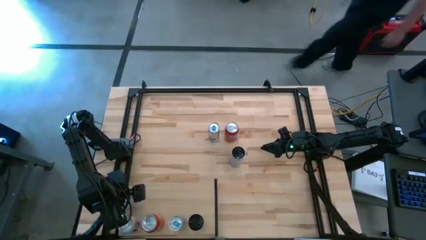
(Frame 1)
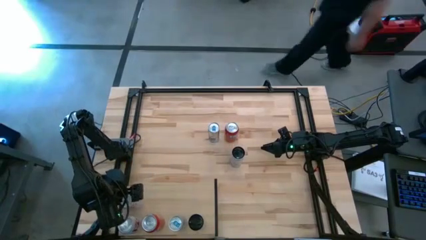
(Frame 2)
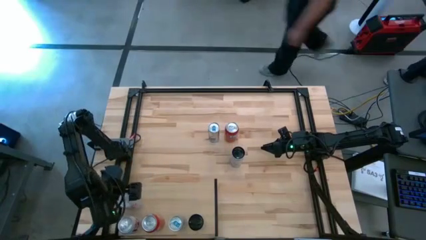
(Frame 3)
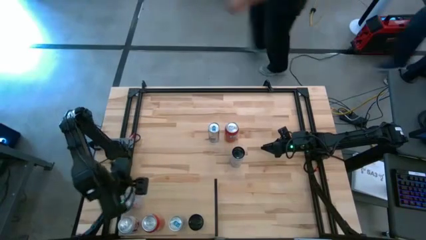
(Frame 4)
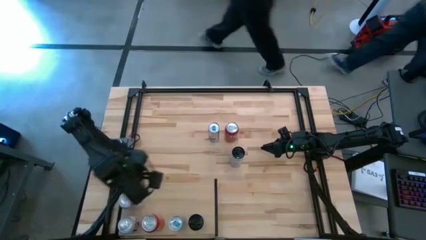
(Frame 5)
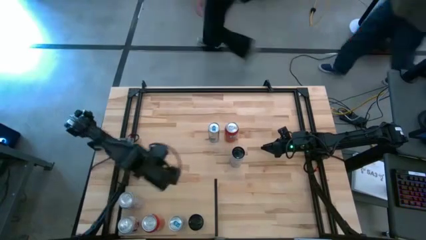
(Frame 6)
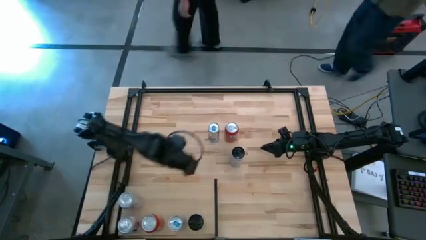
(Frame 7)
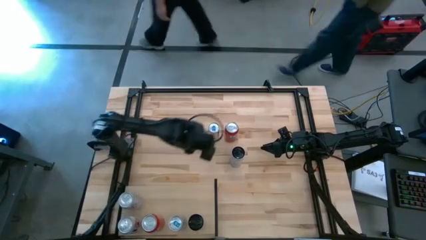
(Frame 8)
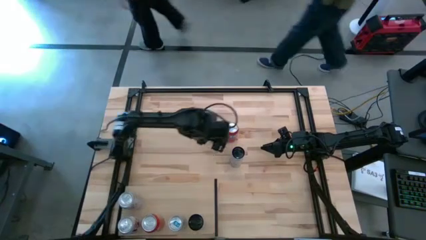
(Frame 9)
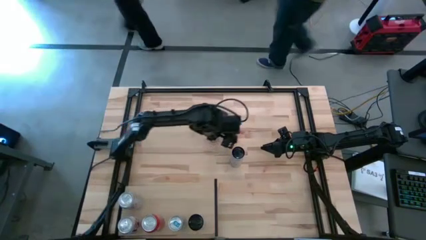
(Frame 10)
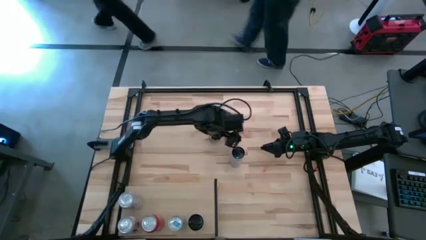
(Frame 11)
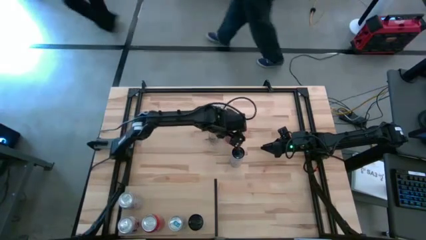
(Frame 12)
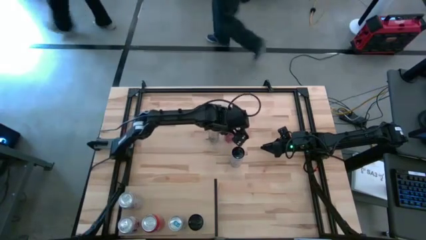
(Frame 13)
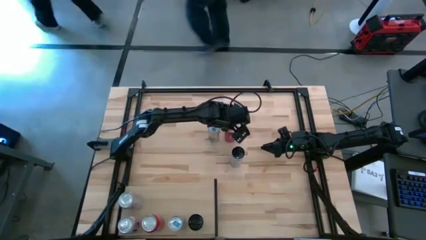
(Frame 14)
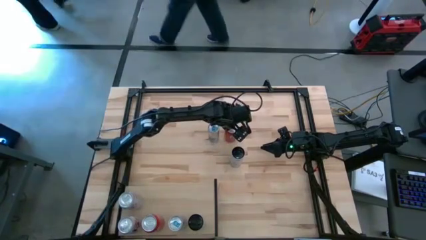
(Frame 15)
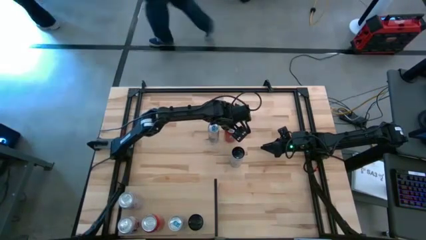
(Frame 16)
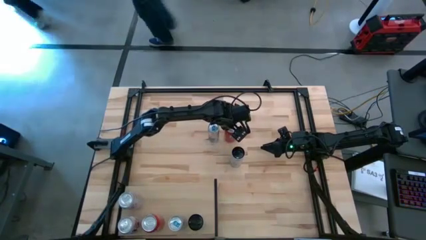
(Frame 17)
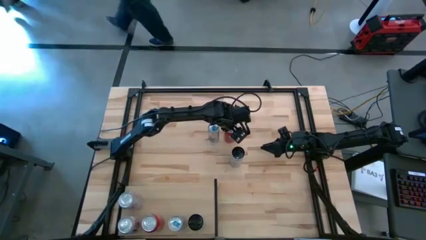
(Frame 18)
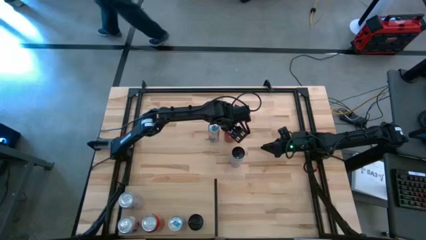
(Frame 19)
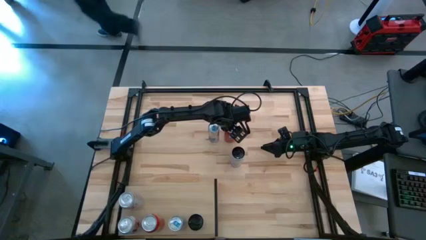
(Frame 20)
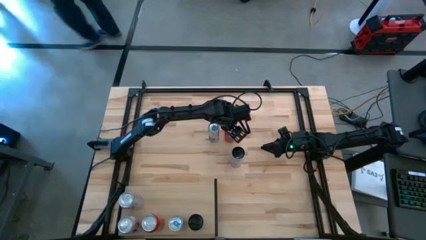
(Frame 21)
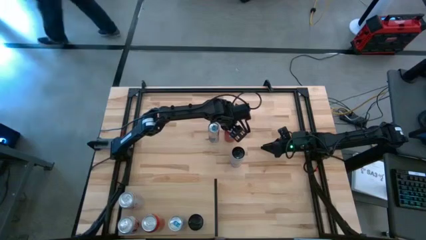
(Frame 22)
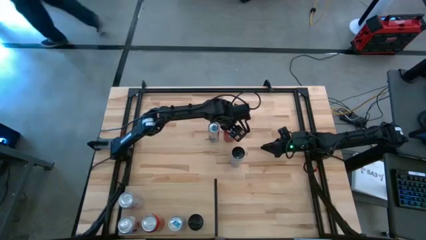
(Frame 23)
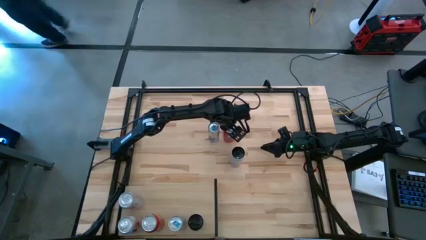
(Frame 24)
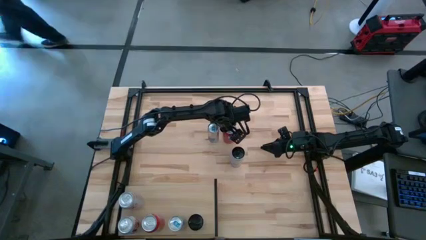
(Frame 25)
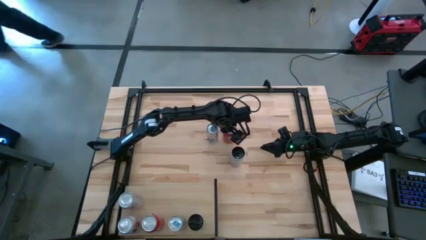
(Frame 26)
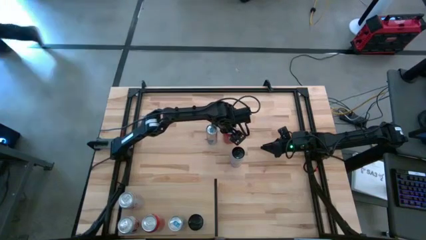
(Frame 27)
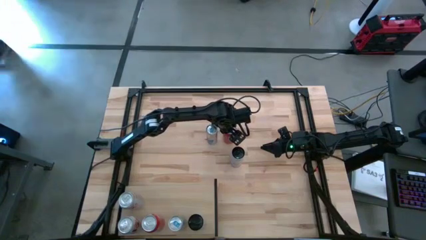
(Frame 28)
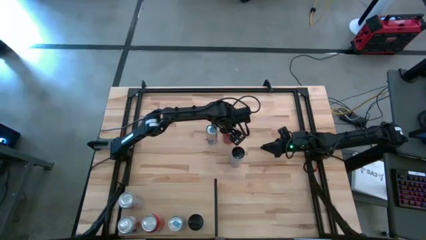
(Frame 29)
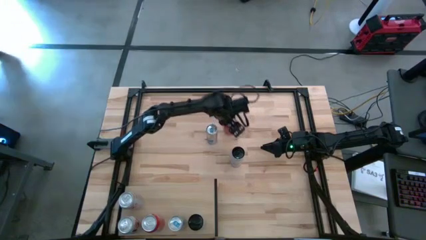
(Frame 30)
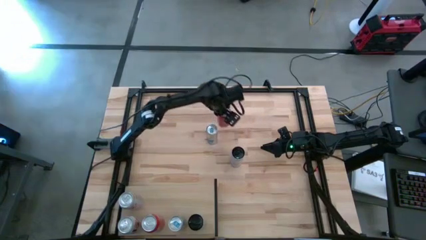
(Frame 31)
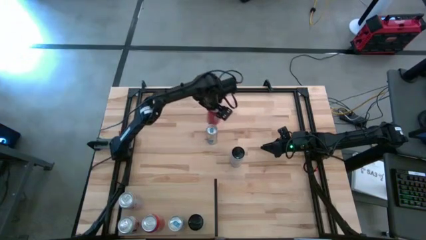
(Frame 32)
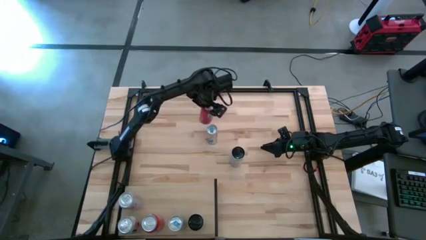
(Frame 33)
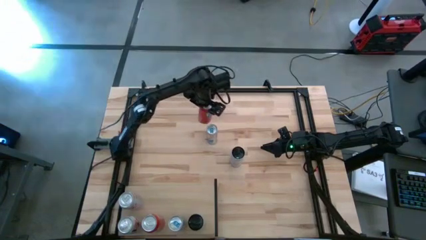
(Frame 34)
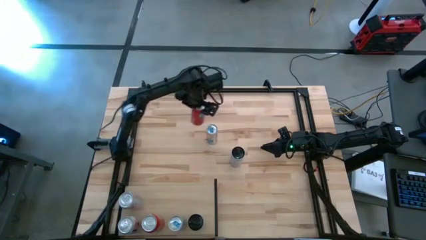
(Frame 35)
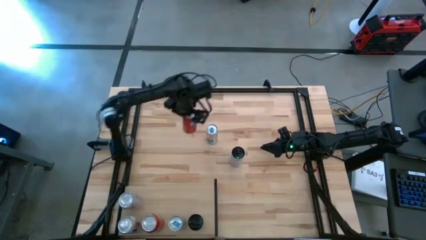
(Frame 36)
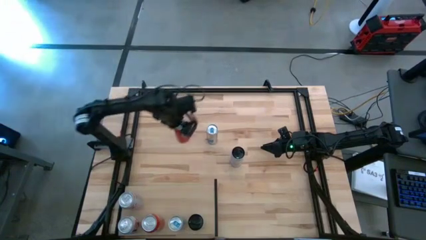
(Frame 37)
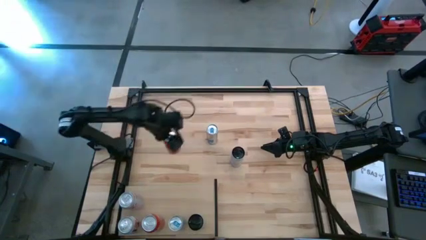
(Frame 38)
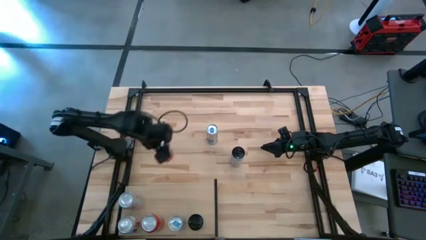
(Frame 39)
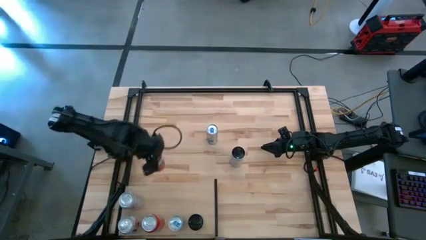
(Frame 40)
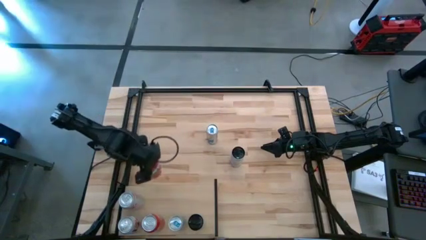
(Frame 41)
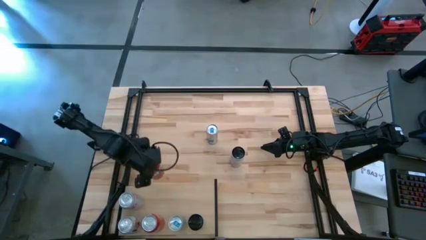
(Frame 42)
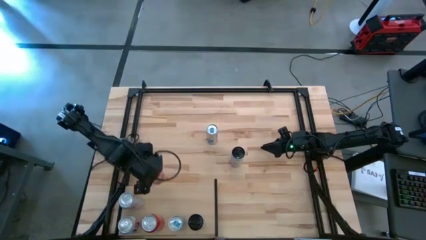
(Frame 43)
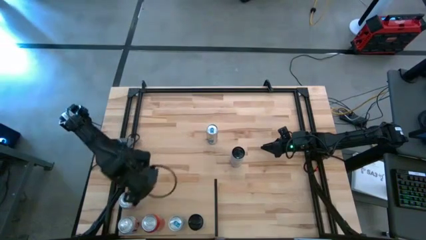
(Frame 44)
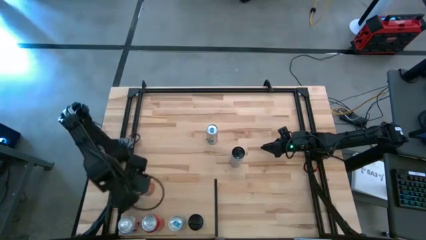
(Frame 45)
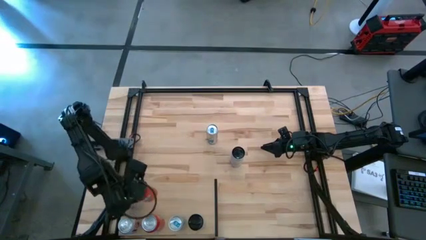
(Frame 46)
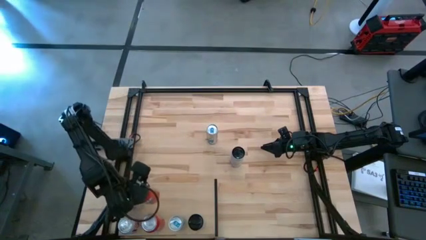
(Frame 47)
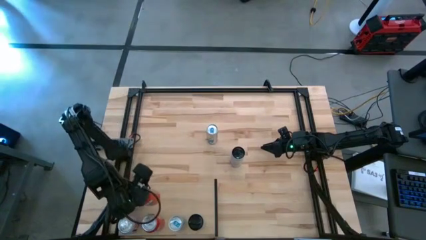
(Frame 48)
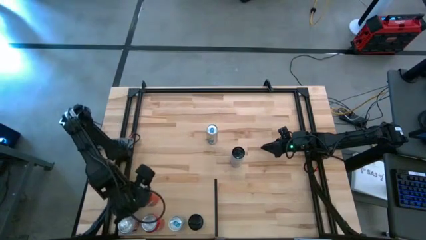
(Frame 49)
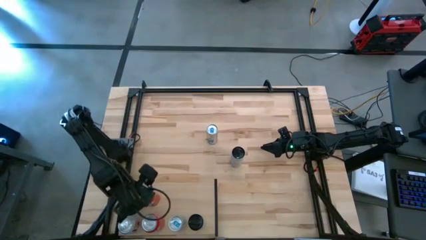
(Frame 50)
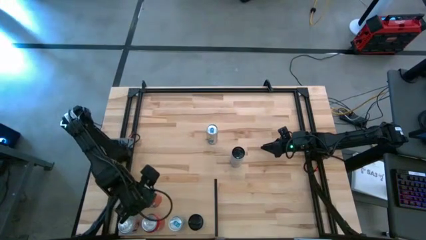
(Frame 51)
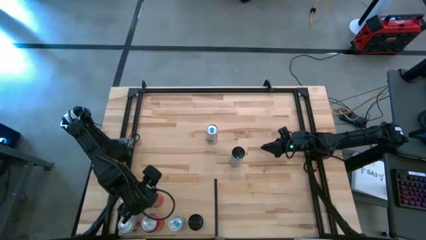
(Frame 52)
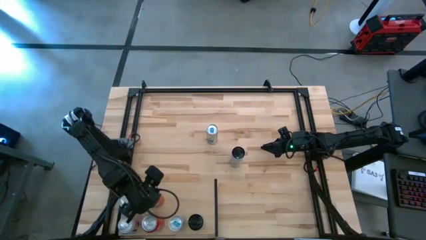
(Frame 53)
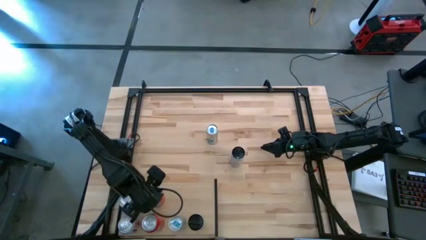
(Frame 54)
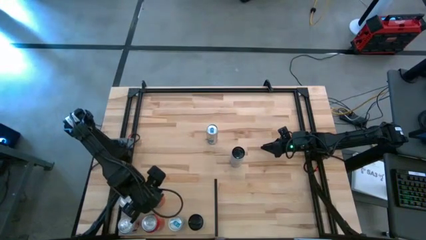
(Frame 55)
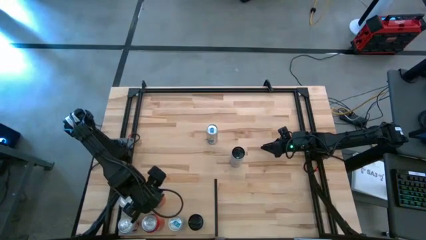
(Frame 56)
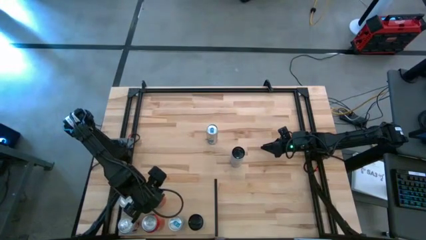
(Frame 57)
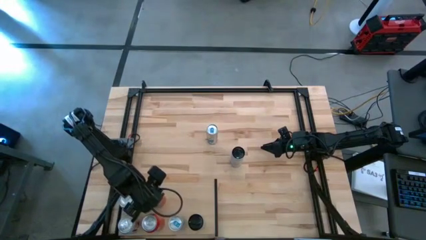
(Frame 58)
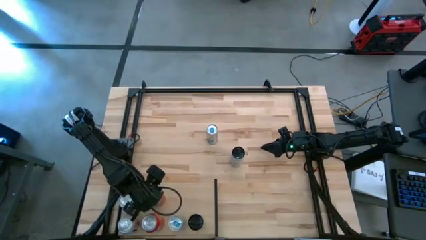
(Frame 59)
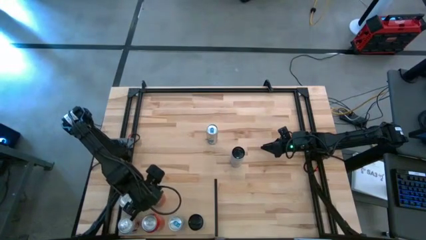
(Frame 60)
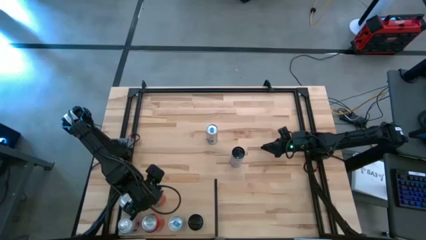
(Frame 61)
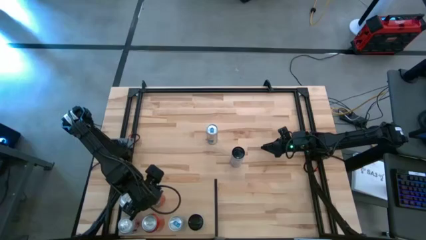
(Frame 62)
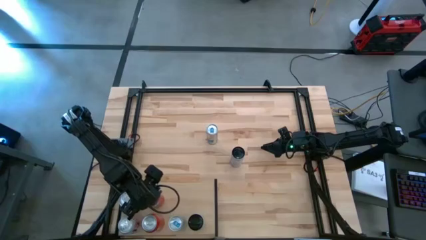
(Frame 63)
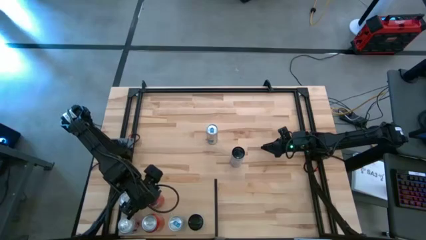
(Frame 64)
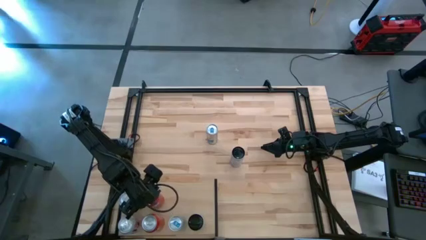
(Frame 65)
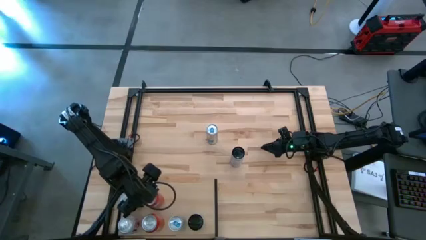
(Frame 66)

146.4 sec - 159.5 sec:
Task: Place canned beverage on shelf
Put the orange soda can on the shelf aligned with the other orange soda can

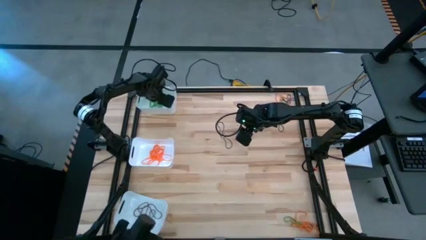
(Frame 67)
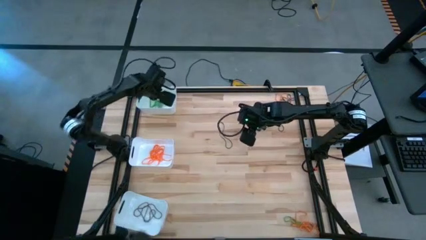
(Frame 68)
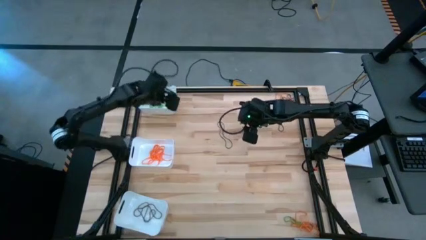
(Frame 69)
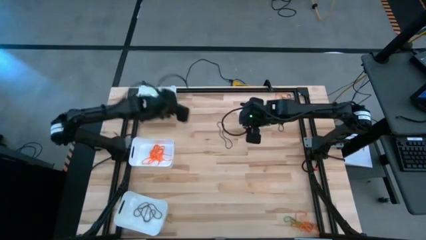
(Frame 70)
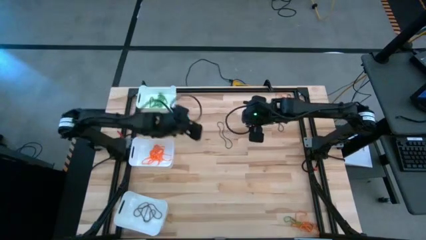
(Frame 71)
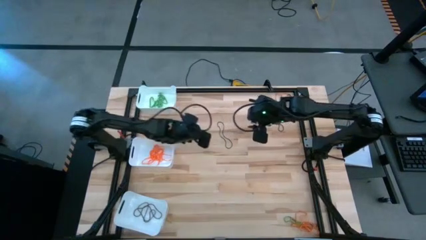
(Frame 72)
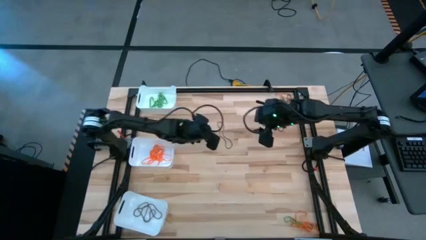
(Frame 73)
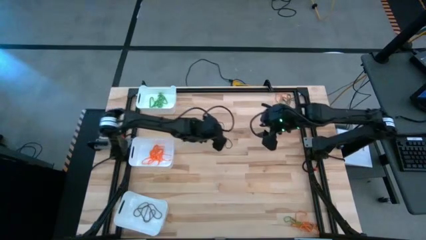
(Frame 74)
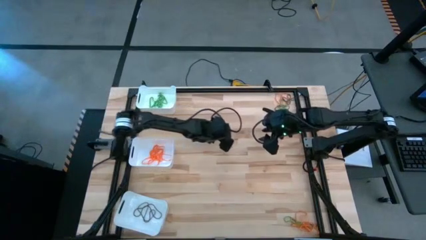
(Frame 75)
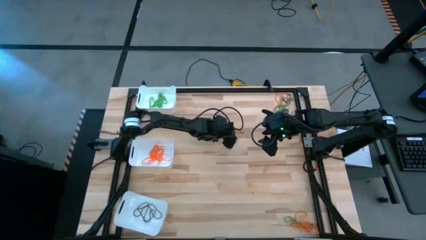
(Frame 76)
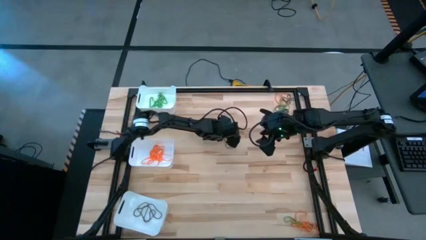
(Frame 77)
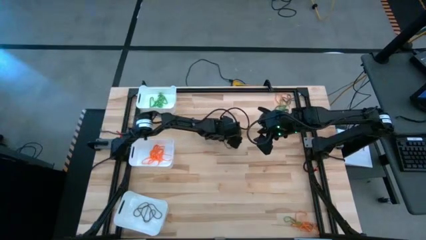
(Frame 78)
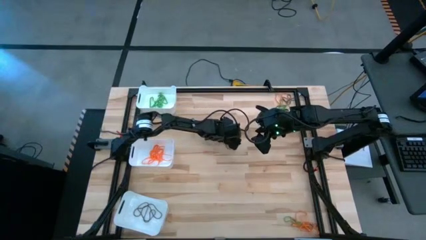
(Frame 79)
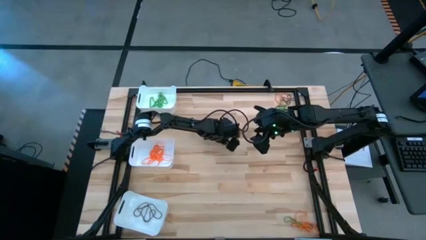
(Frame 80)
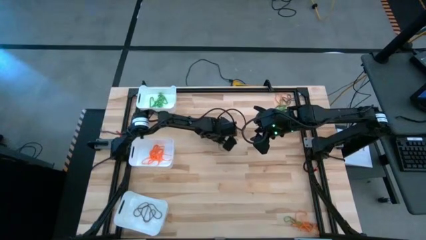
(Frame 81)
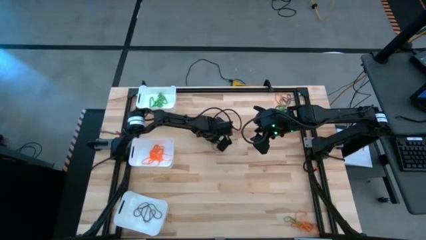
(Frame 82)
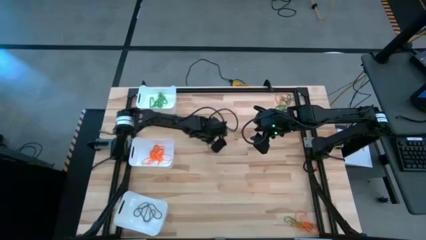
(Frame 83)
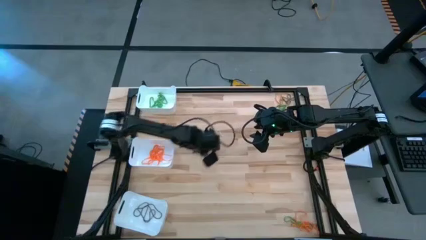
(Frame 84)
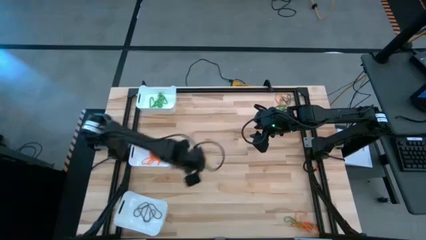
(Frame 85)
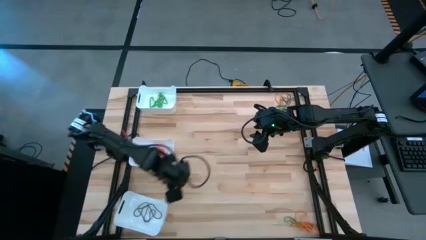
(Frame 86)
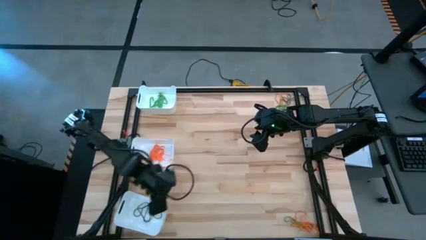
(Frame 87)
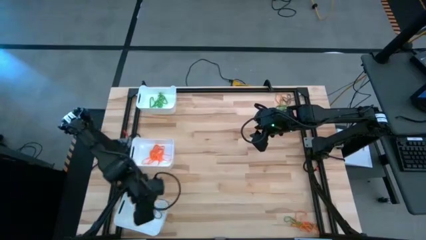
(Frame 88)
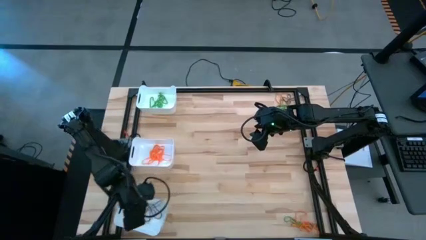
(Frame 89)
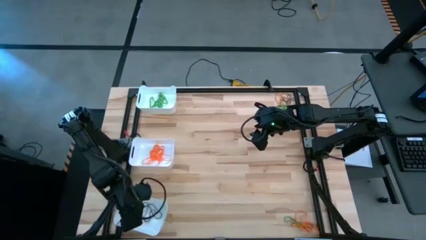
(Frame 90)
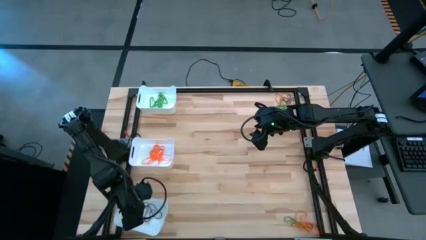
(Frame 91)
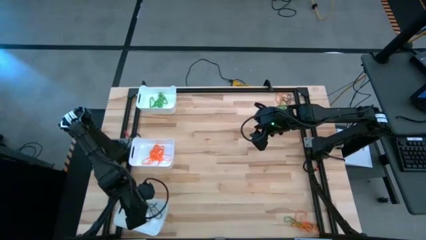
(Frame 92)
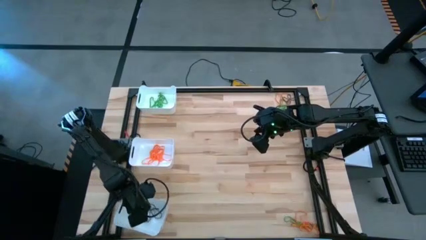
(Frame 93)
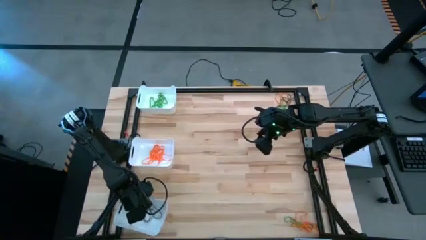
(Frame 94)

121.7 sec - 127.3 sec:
Task: Sort rubber bands into baskets
Put the black rubber band into the bottom white bin
